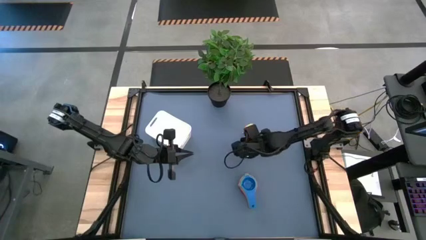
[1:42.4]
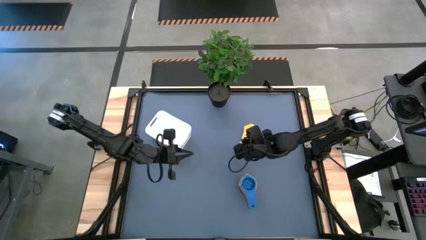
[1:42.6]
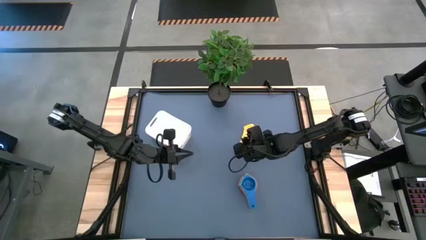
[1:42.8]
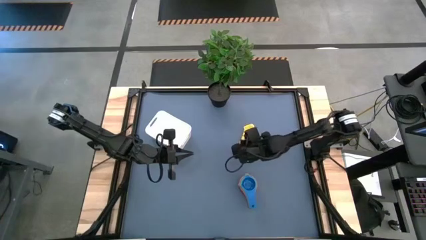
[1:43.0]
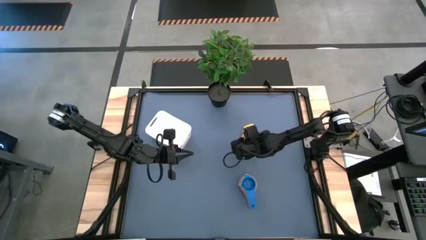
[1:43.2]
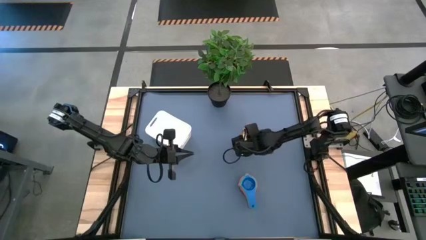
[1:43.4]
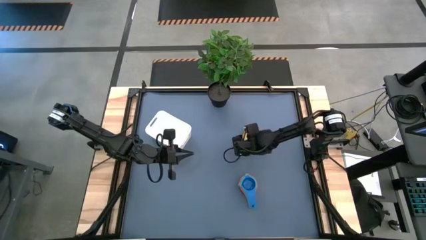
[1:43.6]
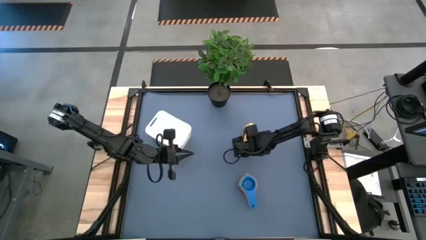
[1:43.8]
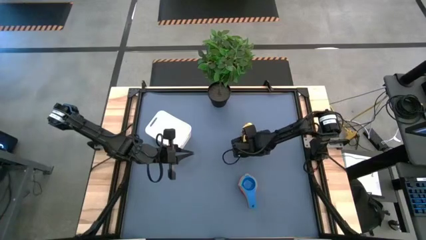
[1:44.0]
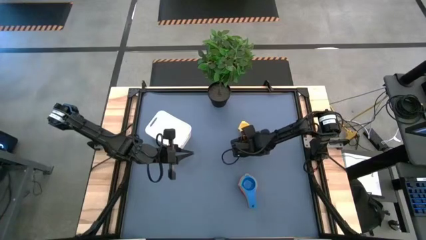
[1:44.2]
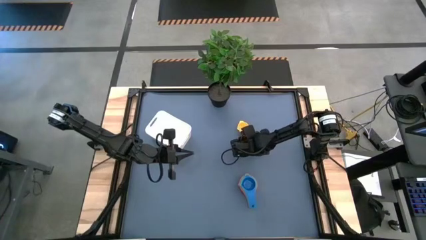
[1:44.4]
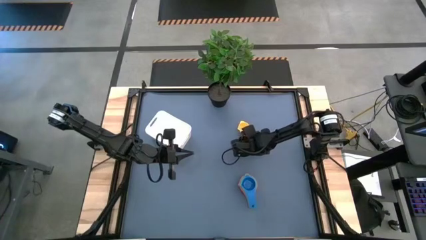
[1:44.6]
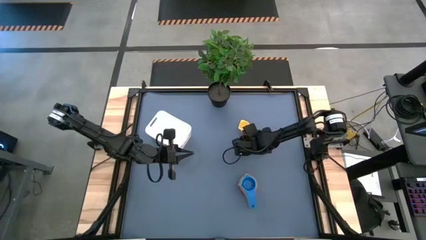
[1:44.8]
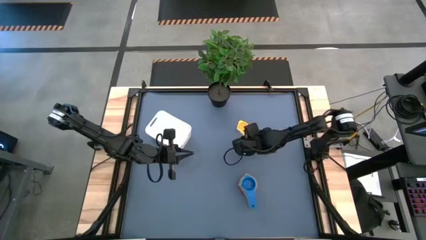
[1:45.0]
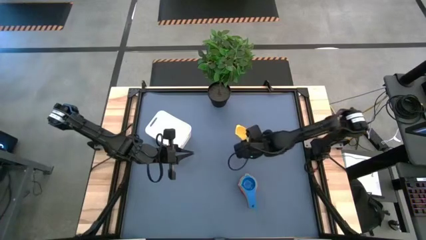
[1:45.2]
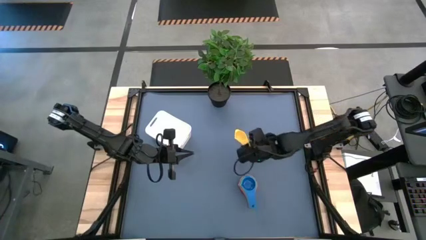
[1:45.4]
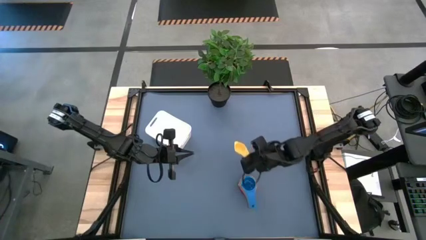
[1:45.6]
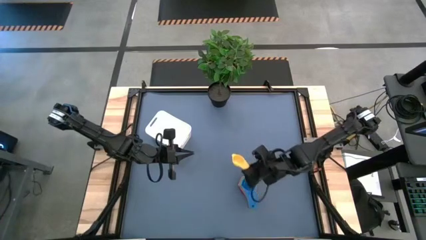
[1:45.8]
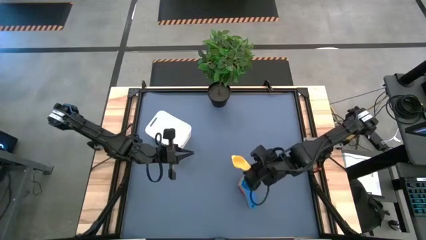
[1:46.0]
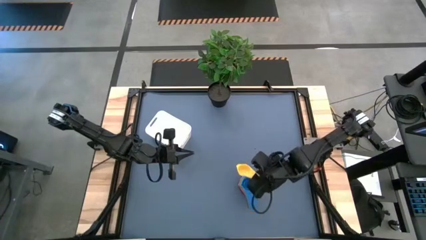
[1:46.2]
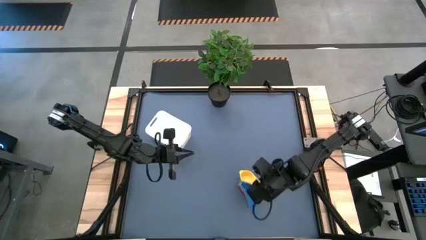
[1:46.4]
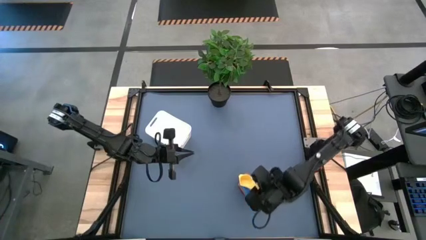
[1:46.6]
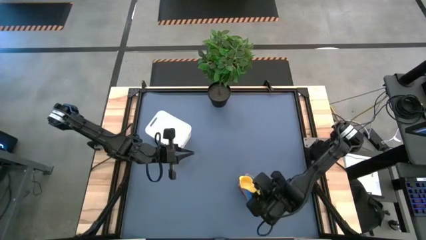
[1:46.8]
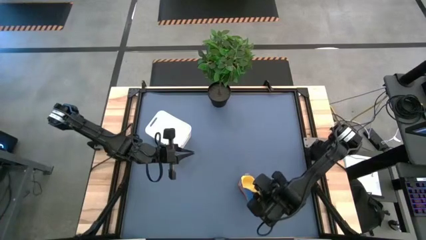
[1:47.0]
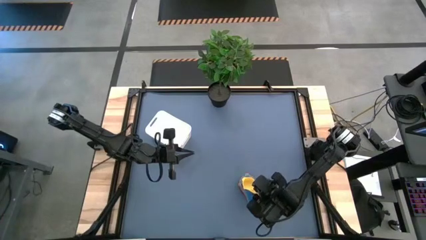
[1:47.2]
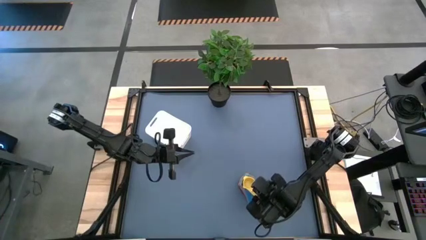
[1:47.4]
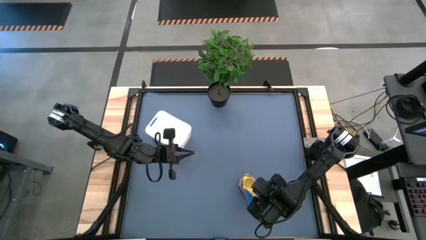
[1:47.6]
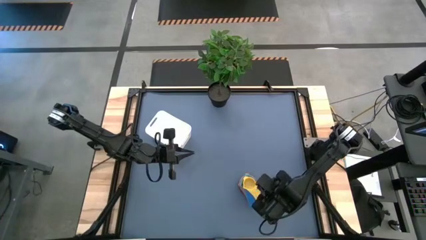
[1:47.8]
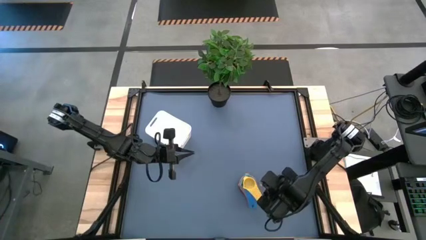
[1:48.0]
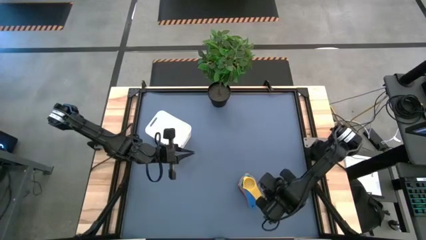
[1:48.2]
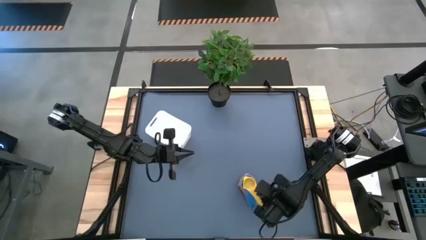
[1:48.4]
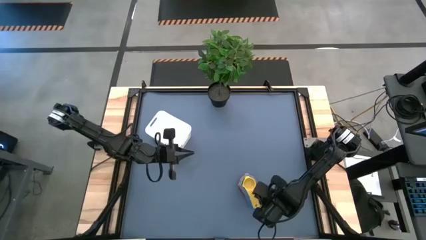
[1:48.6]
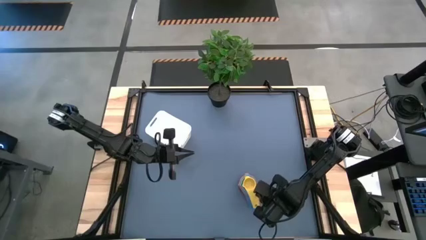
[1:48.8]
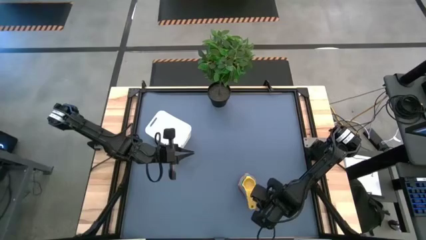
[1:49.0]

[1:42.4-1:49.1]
Task: Nest measuring cups in basket
Stack the yellow measuring cup on the blue measuring cup

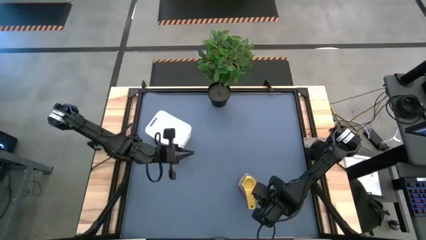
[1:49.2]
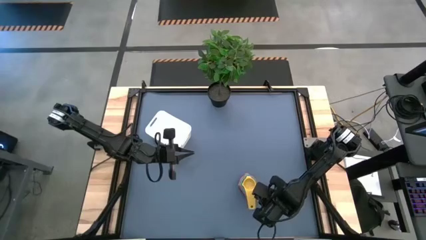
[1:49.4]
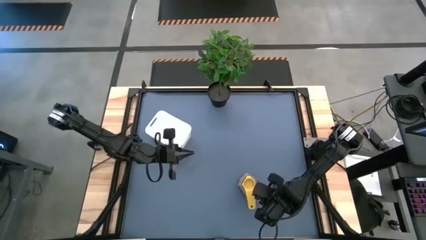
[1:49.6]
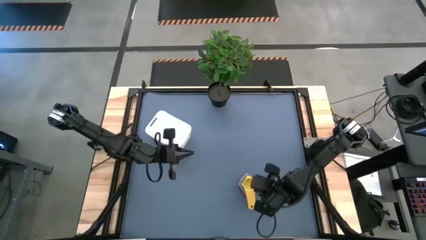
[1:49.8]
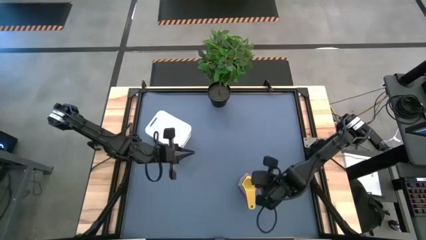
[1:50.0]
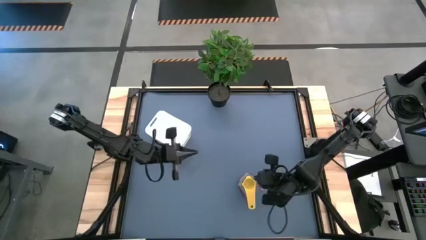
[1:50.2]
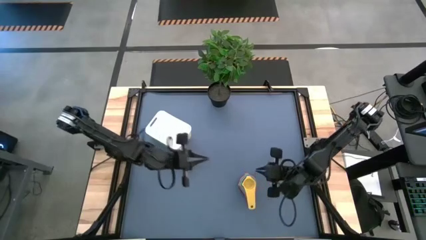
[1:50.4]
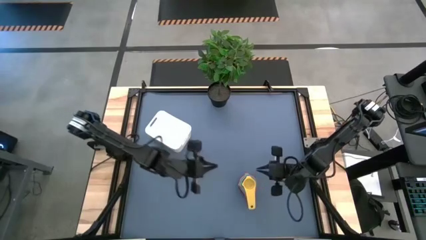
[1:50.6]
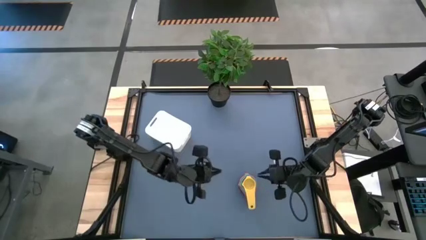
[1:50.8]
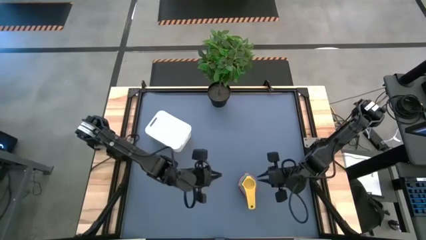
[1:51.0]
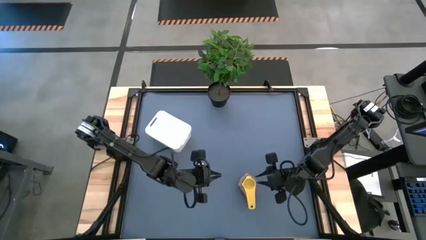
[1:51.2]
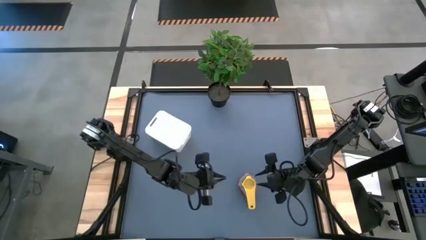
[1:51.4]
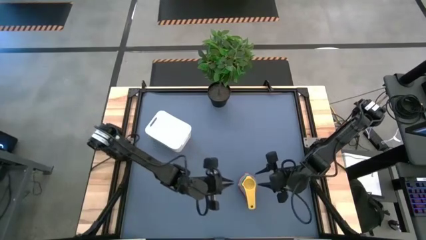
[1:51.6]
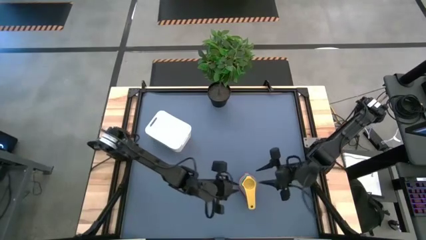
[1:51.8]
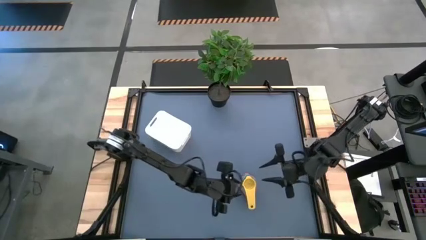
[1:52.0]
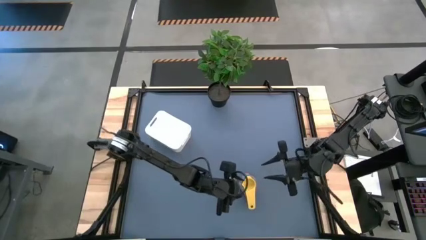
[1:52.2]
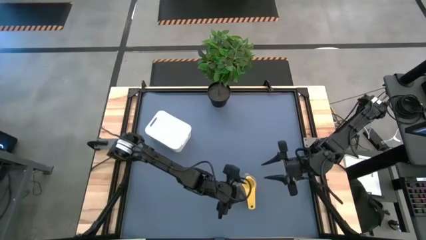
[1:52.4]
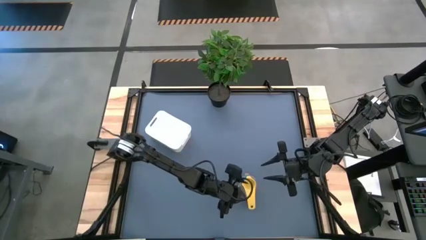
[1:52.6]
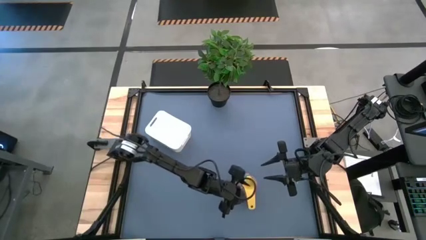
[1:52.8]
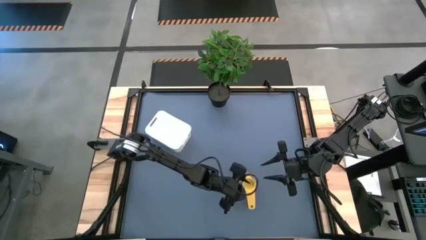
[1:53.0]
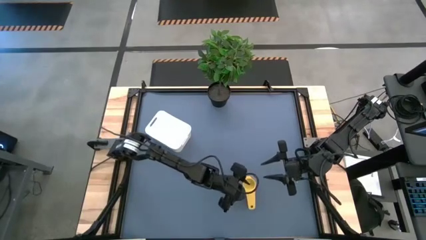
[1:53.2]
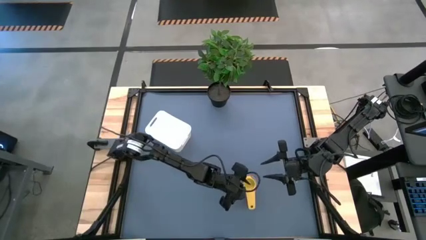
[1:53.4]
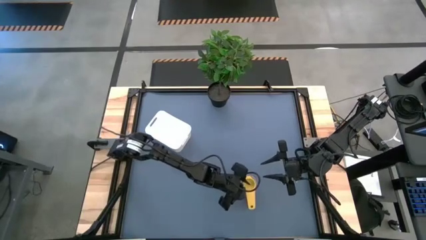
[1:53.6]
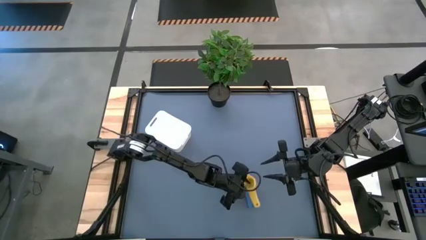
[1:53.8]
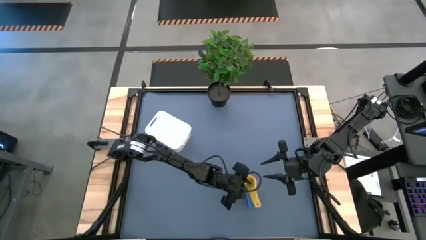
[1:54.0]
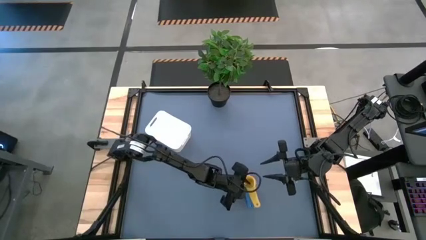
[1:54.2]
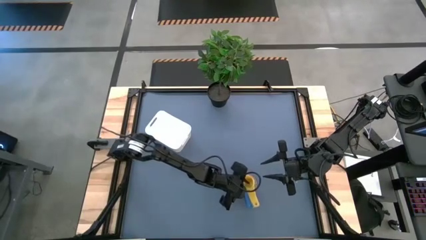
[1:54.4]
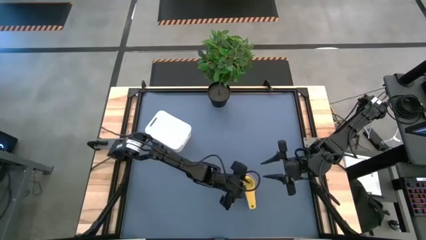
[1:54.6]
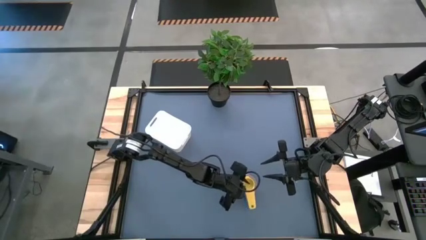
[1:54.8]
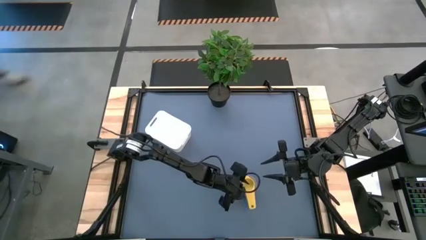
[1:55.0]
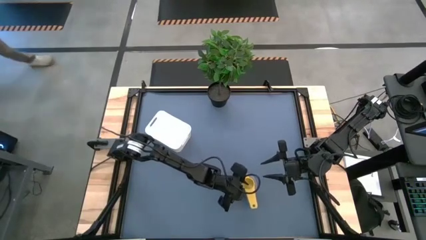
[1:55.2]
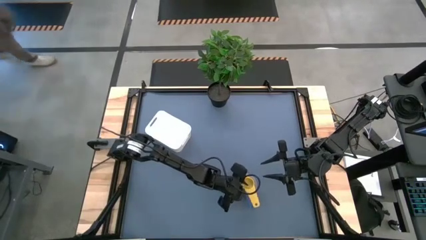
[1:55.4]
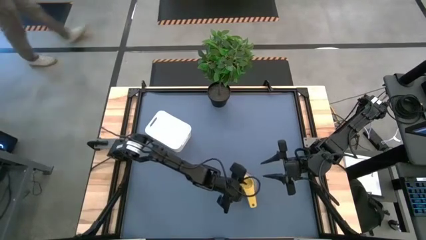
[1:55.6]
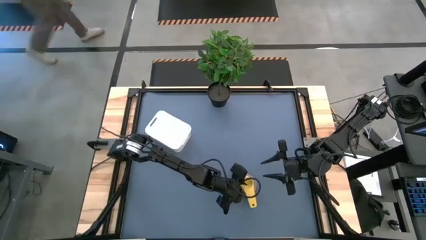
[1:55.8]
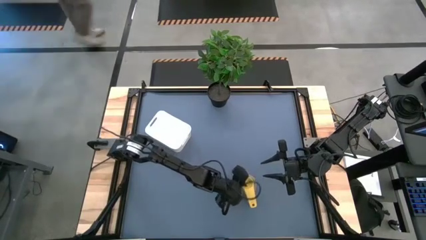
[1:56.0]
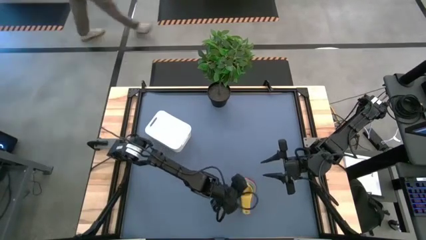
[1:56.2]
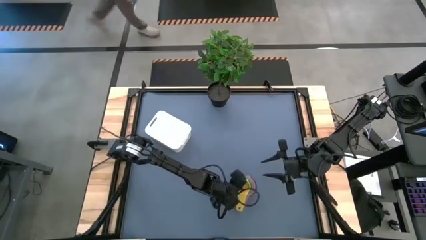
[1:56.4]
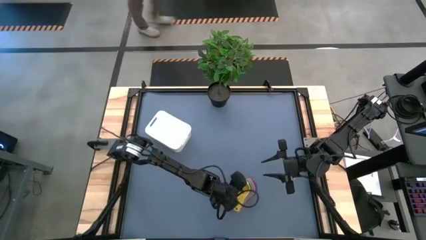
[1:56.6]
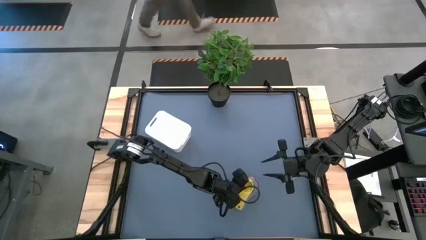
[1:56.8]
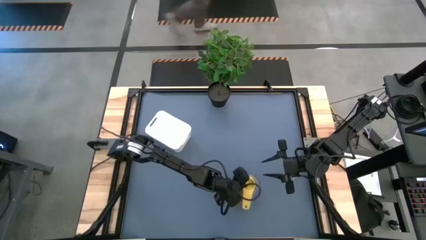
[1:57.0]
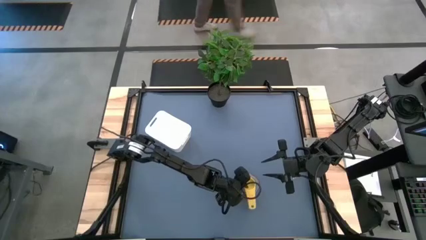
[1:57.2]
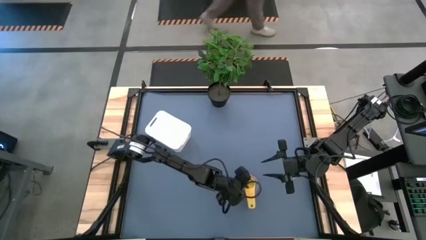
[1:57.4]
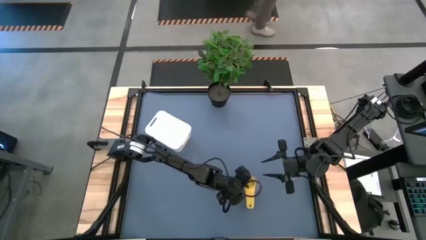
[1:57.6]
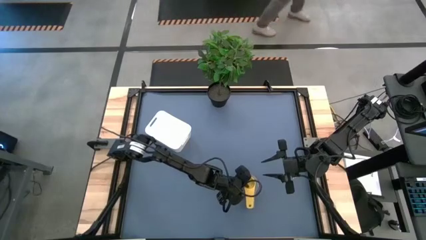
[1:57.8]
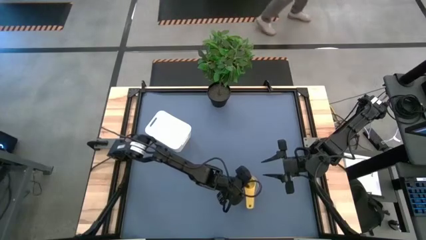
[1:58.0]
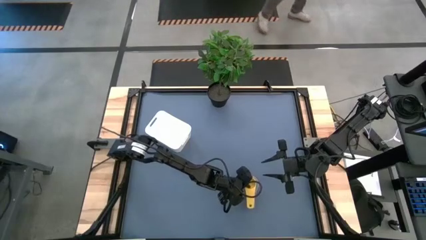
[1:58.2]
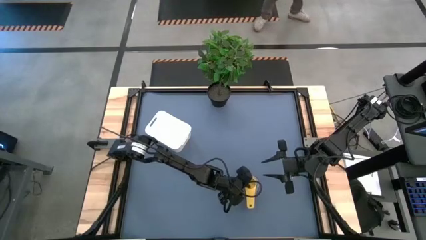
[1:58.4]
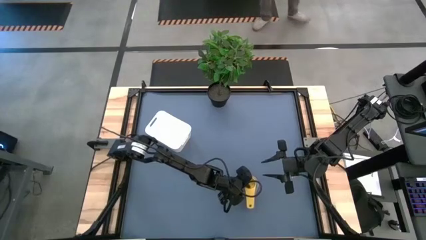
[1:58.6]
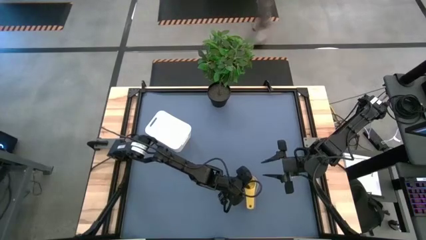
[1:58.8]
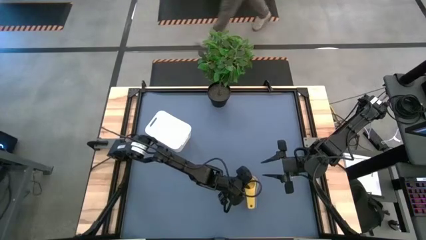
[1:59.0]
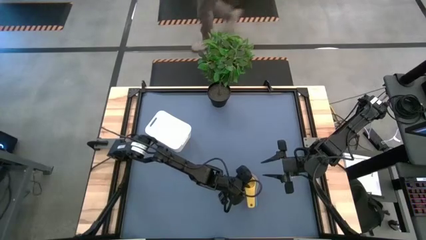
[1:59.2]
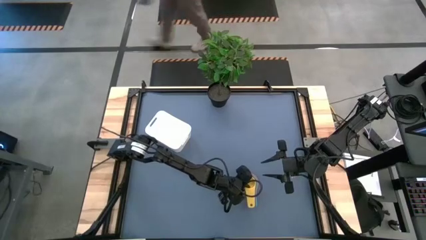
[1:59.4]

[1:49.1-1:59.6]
Put the measuring cups into the white bin
